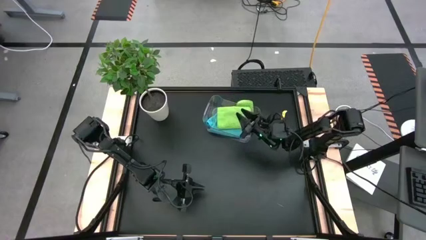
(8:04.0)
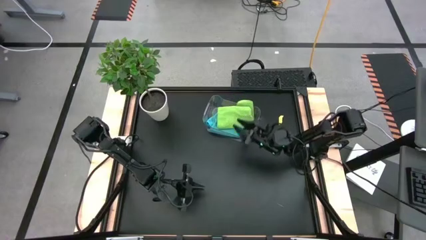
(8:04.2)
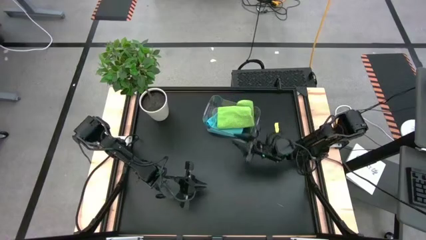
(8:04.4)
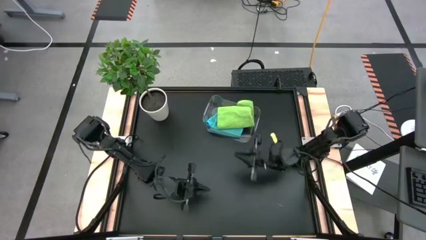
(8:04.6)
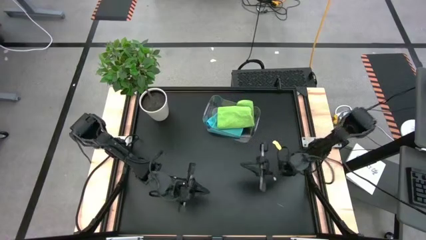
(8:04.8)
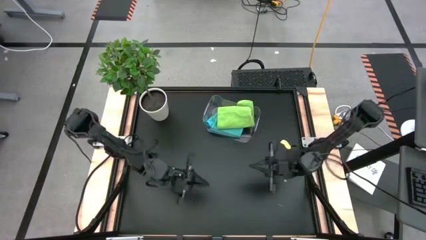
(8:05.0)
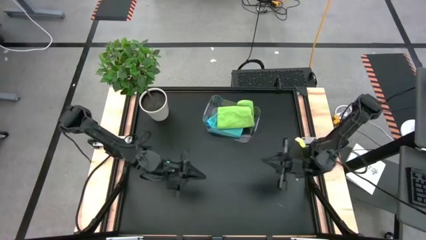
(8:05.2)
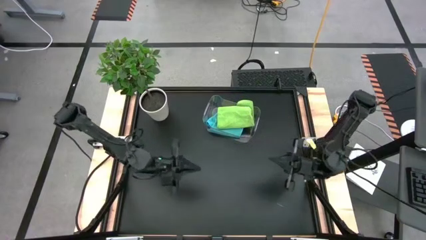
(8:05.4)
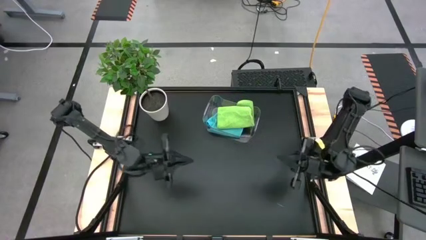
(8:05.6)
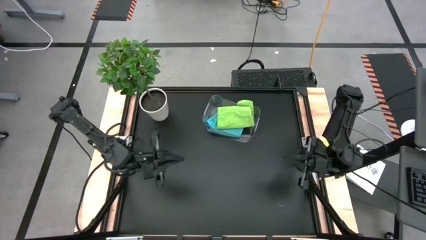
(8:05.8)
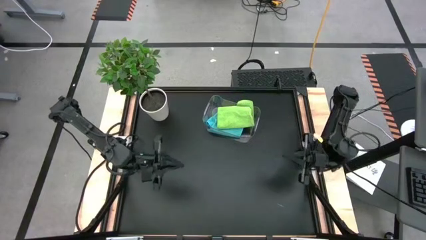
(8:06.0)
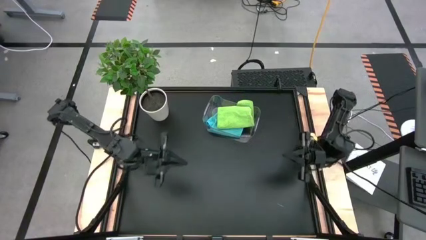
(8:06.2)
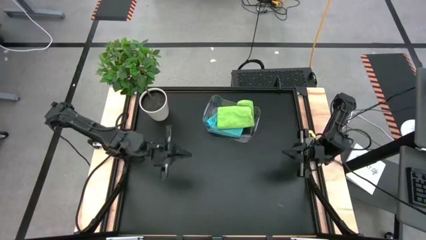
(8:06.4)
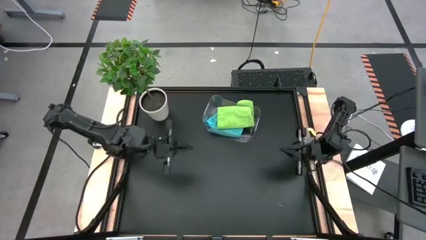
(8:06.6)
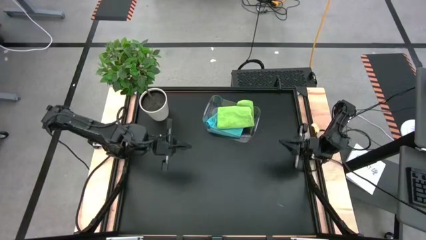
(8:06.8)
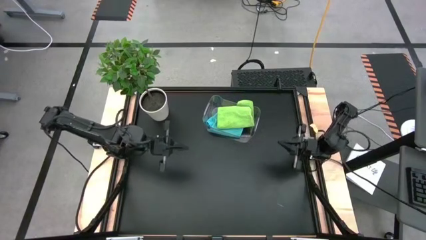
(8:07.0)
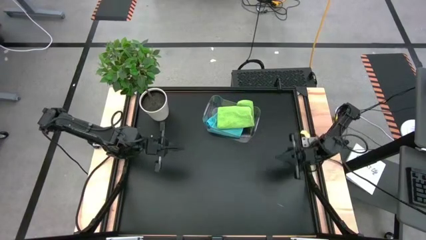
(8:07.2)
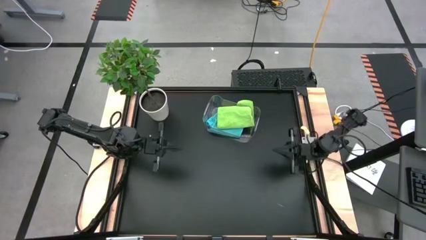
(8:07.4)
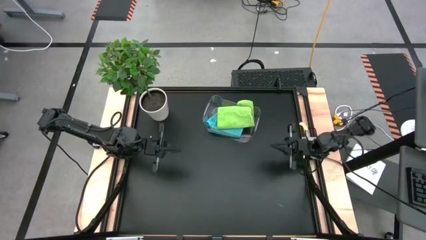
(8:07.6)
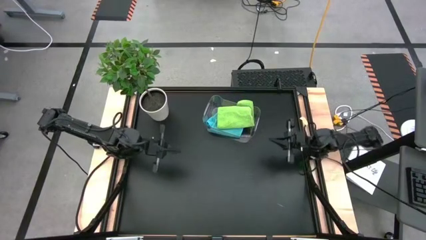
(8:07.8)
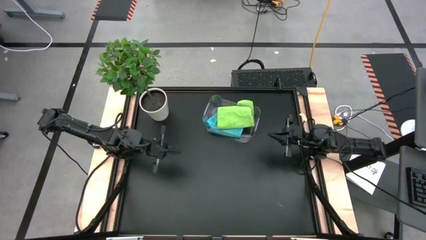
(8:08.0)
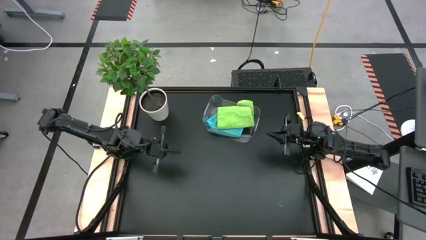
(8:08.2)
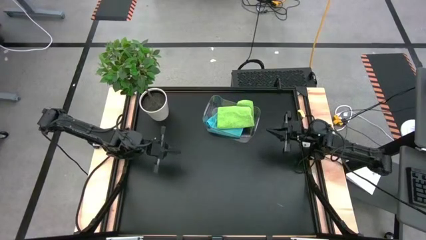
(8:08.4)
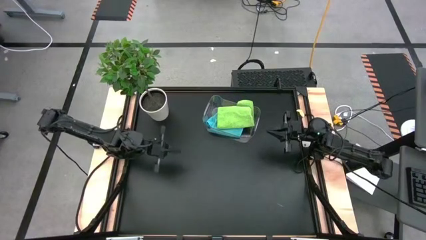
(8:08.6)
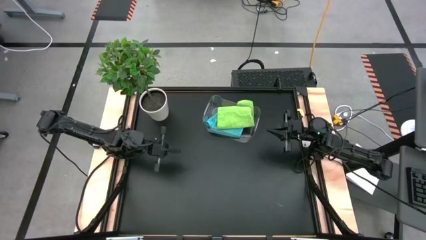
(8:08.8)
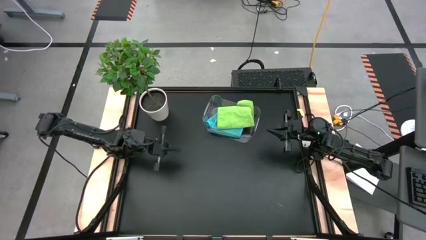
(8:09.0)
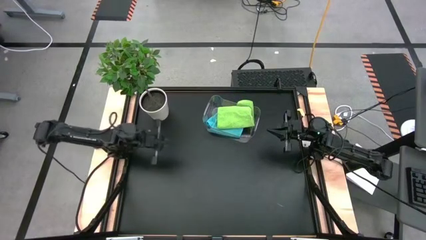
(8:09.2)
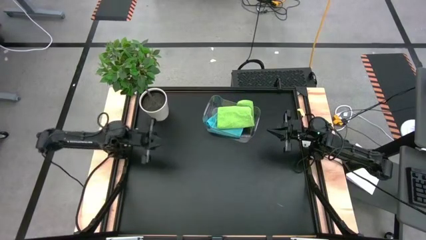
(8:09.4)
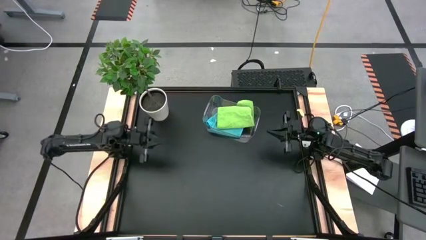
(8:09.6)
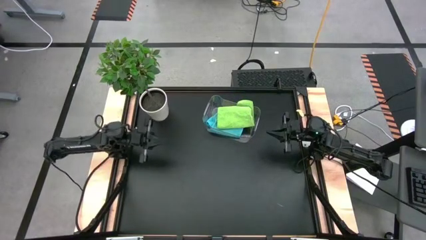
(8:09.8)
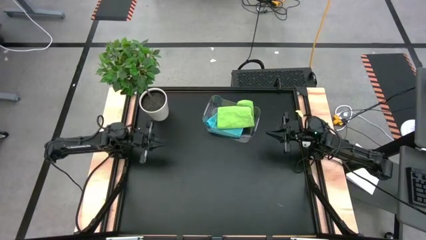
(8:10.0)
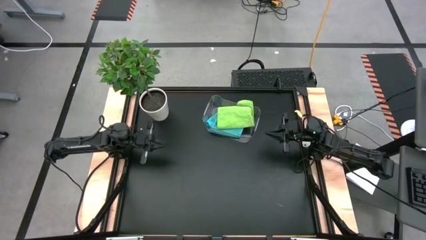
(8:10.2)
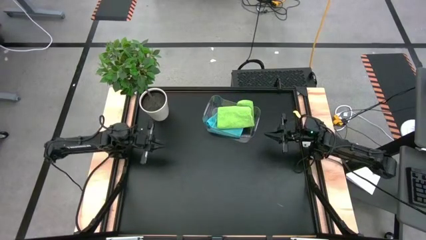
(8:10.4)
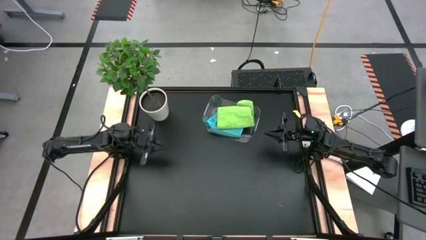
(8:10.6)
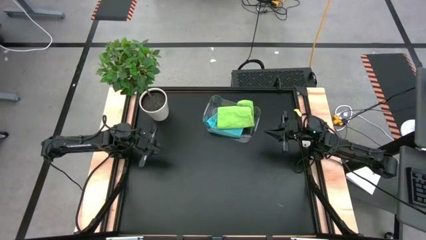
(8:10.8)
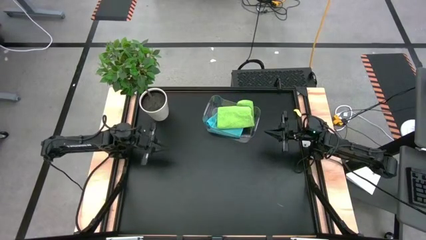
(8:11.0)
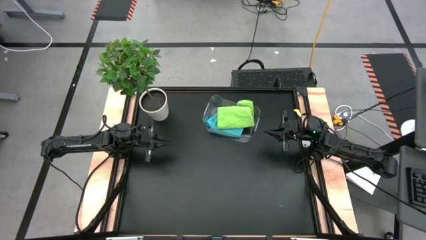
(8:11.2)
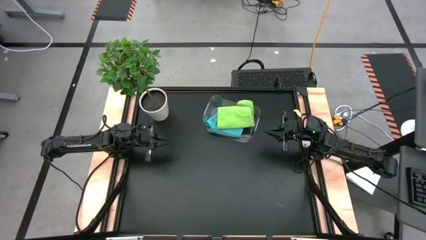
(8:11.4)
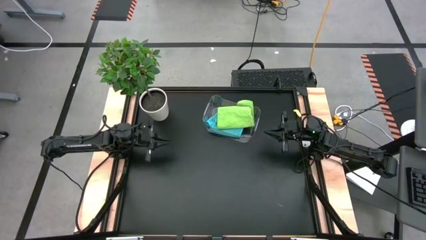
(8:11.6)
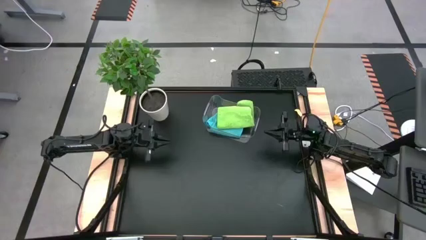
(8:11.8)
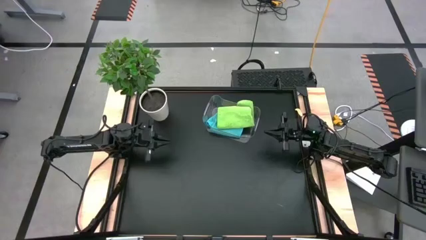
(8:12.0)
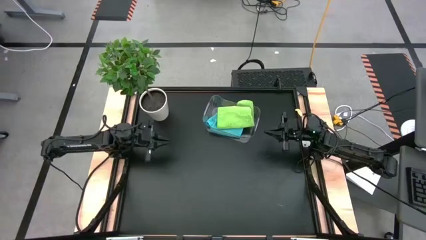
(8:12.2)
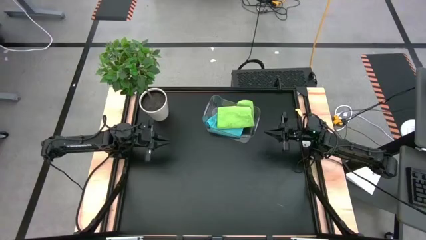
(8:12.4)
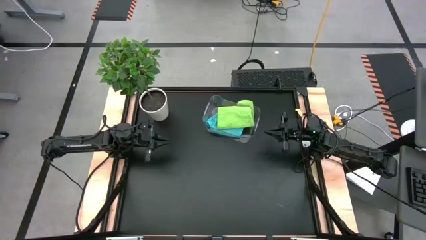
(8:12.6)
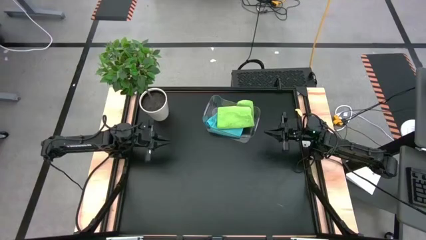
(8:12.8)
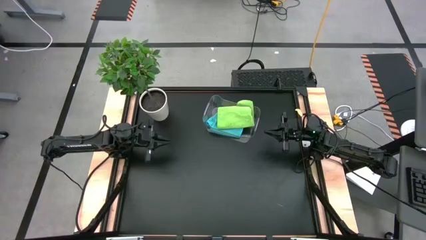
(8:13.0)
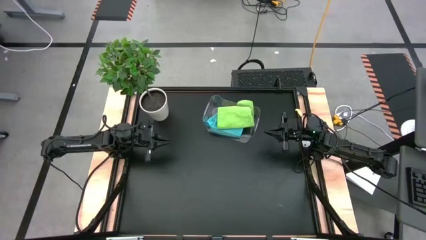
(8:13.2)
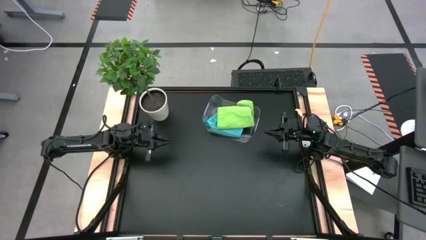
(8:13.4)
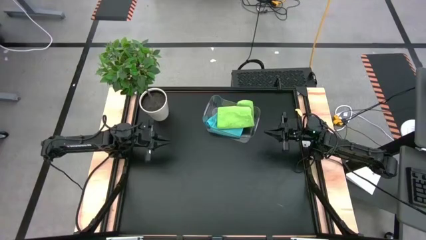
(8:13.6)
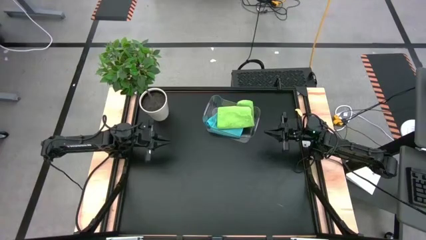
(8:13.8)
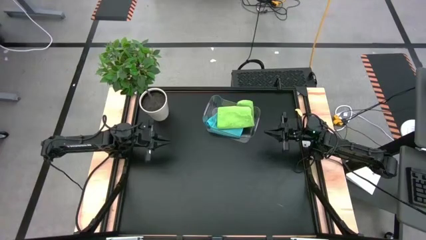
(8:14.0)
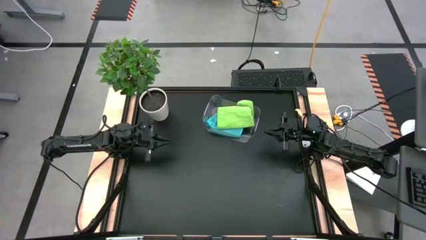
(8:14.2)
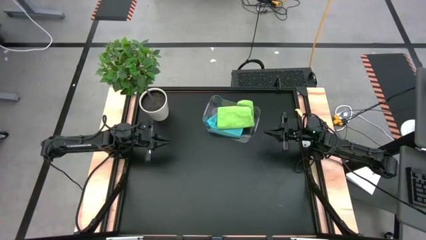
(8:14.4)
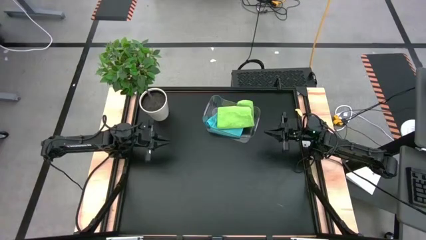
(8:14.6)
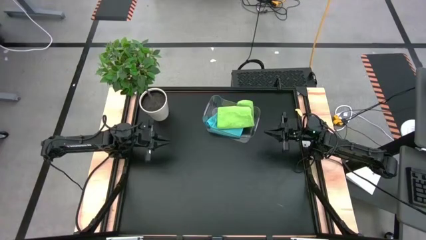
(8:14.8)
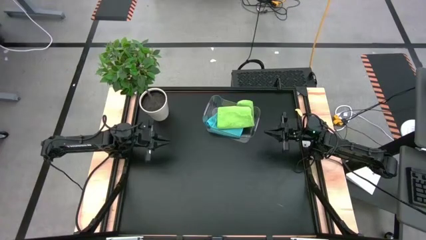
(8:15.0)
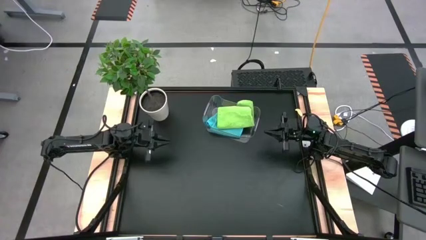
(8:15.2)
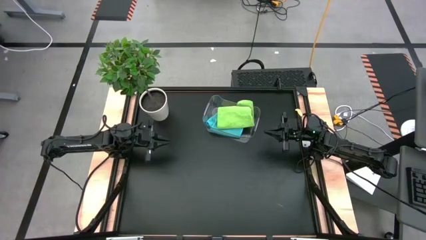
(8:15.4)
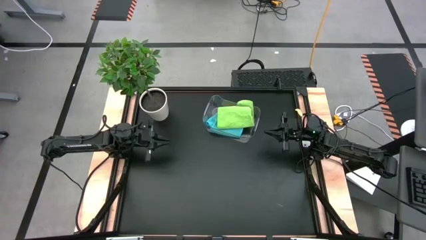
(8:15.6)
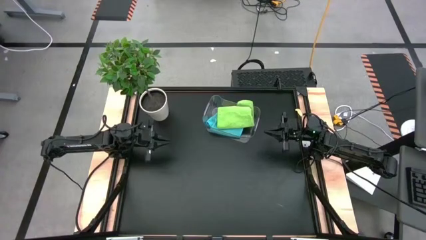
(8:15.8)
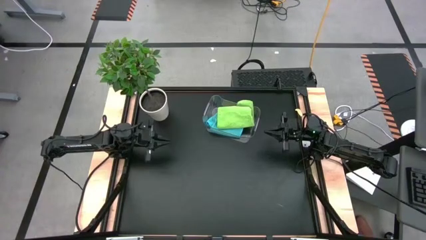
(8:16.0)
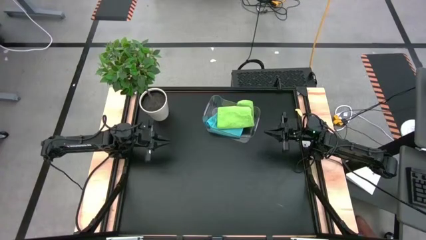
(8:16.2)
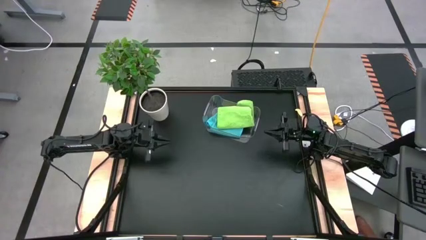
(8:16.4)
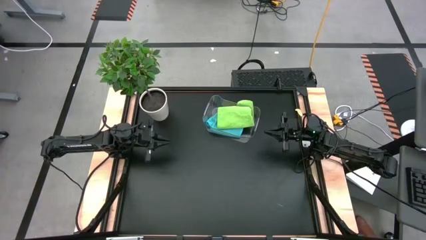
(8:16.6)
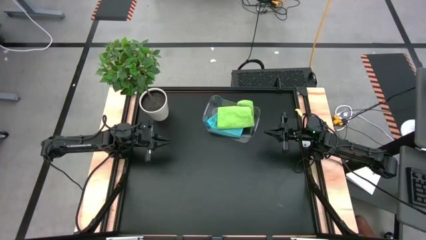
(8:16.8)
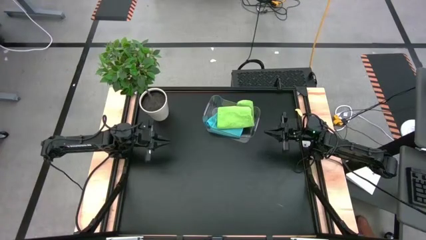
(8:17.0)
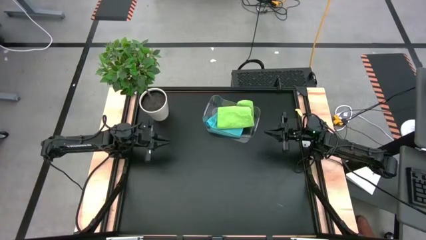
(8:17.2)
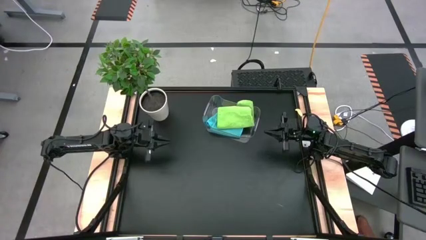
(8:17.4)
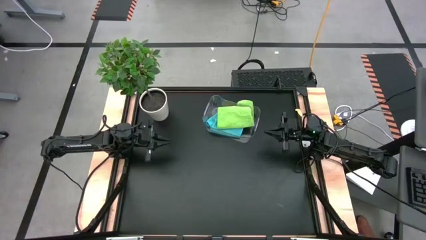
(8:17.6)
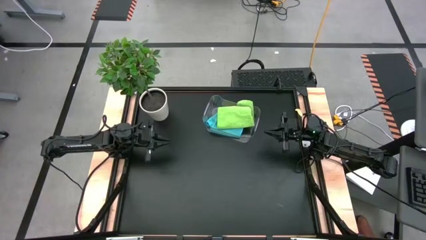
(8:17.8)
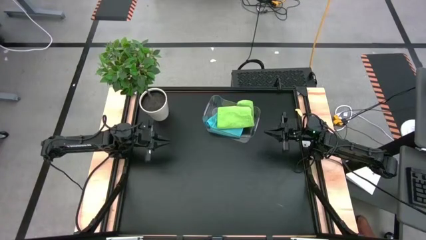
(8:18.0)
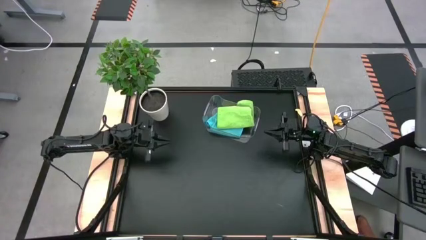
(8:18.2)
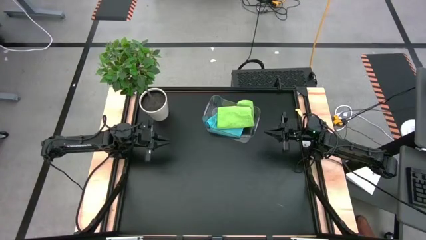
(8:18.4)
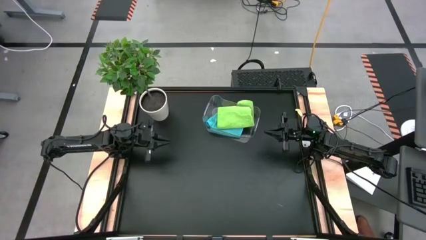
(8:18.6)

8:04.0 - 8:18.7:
Task: Fold microfiber towels
Return to Home Position

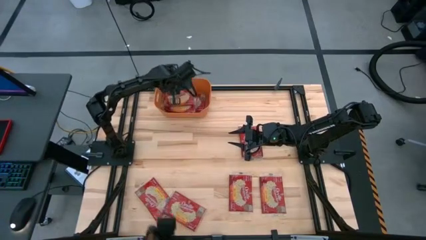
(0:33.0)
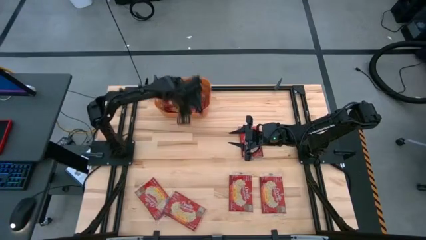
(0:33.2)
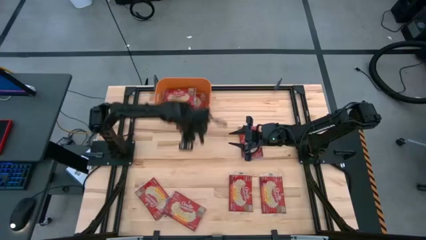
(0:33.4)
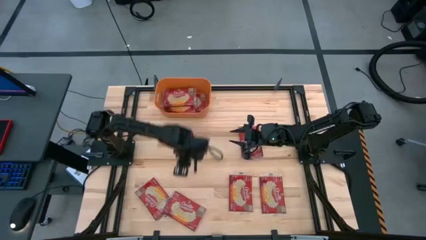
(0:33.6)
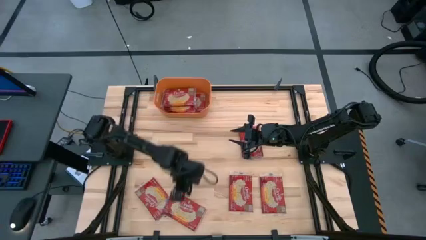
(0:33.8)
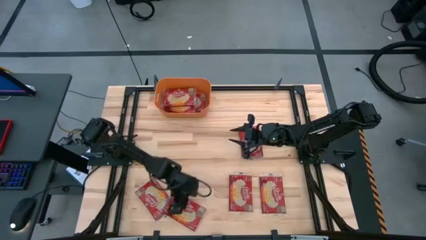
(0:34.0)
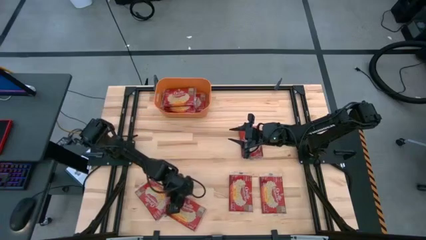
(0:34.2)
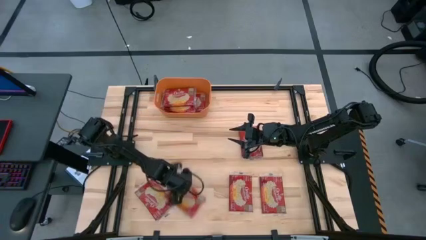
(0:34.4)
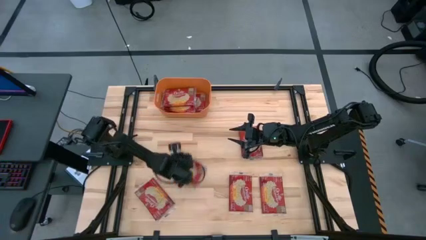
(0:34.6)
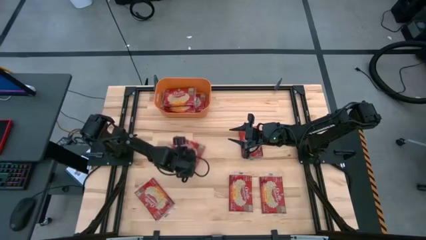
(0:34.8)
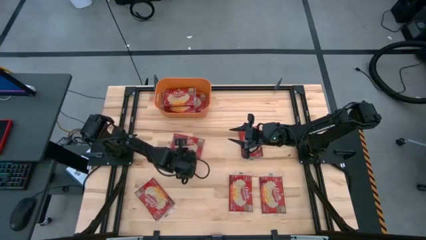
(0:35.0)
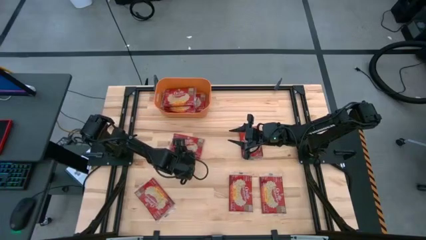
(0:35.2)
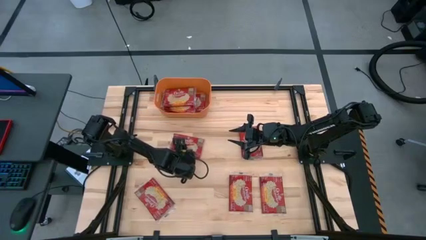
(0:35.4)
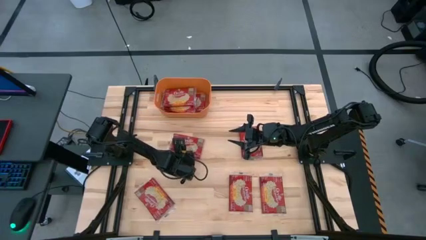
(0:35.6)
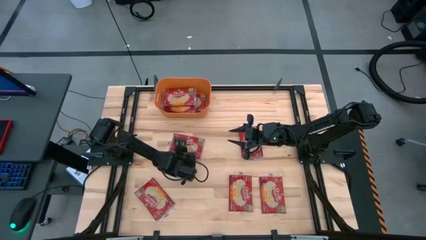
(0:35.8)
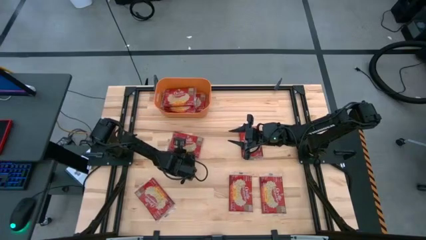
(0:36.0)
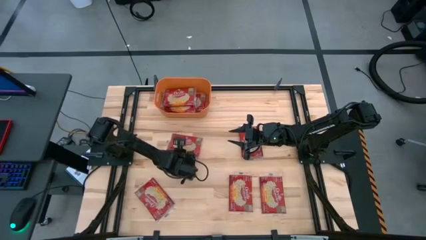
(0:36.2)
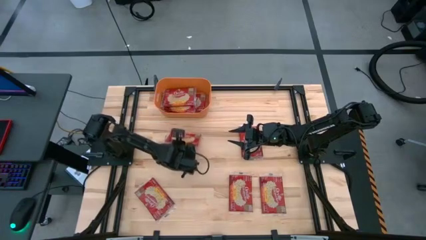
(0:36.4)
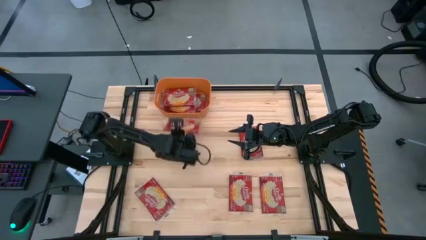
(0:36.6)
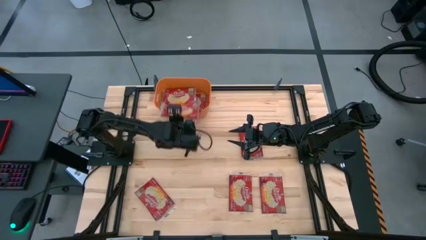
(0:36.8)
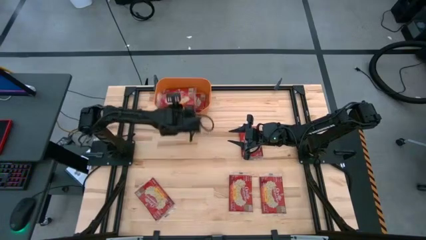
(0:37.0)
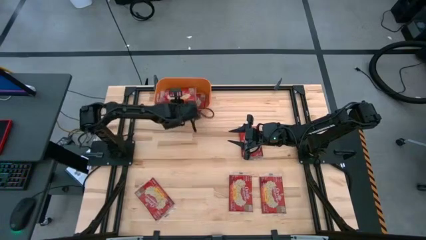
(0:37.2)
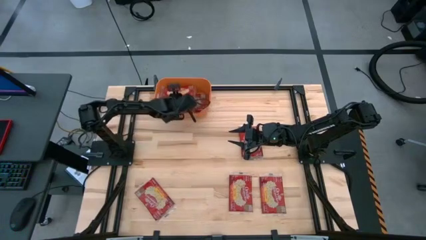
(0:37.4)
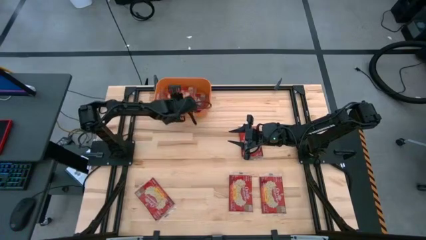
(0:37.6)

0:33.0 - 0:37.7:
Task: Sort popcorn bags into baskets
Put the popcorn bag into the orange bin
